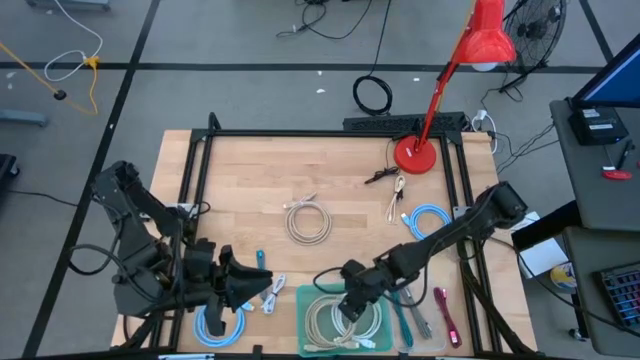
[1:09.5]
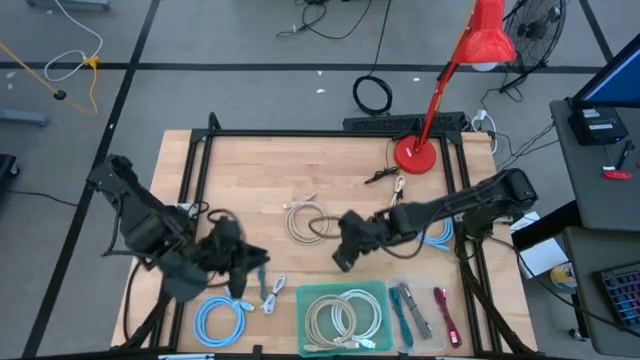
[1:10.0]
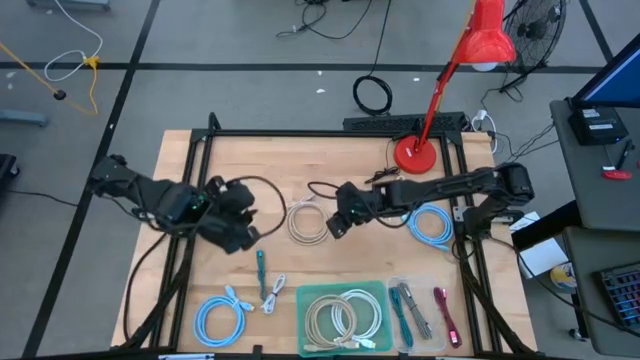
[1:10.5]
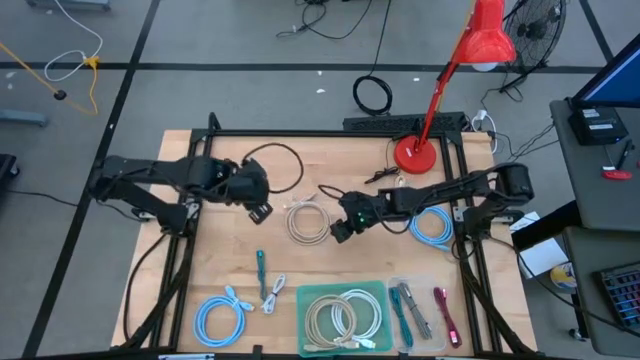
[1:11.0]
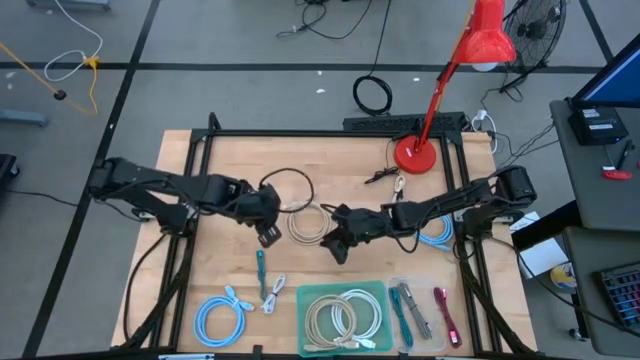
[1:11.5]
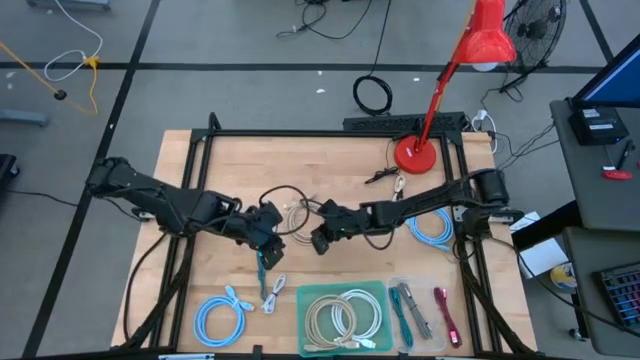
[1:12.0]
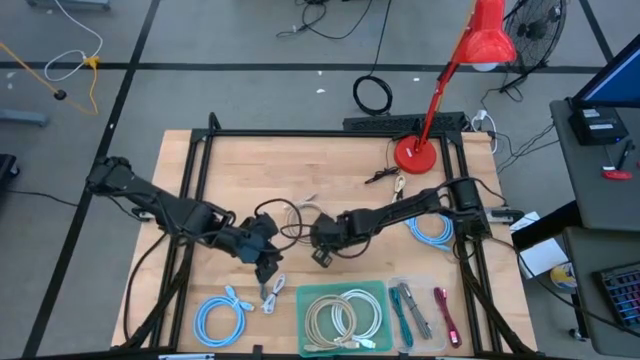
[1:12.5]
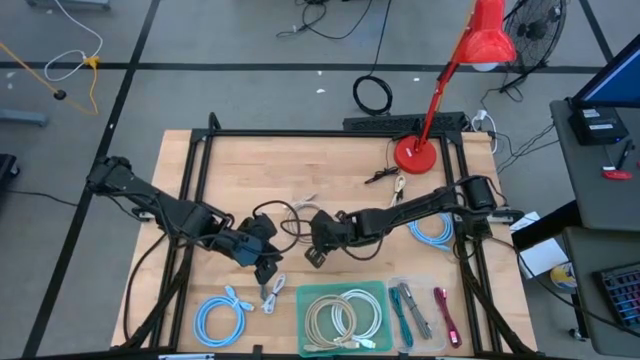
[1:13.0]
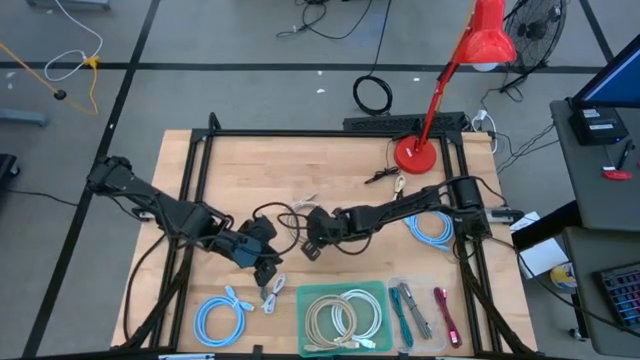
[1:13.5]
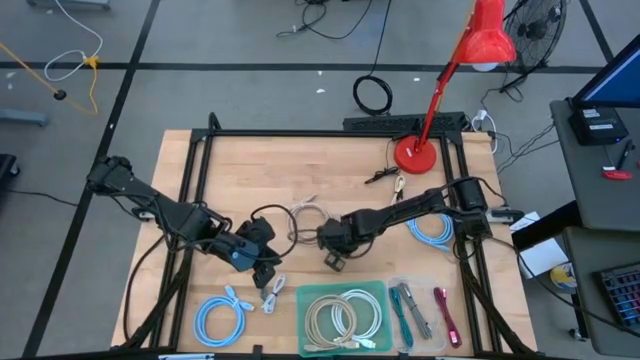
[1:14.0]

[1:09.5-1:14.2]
Task: Pick & Place USB Port
Put the brown hdmi cable into the green bin

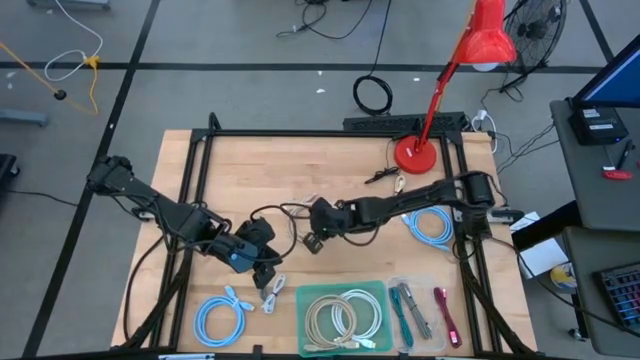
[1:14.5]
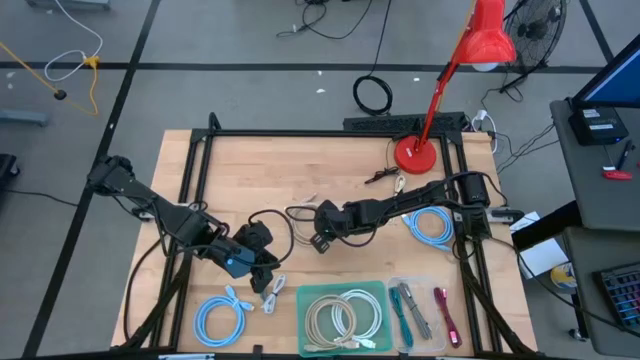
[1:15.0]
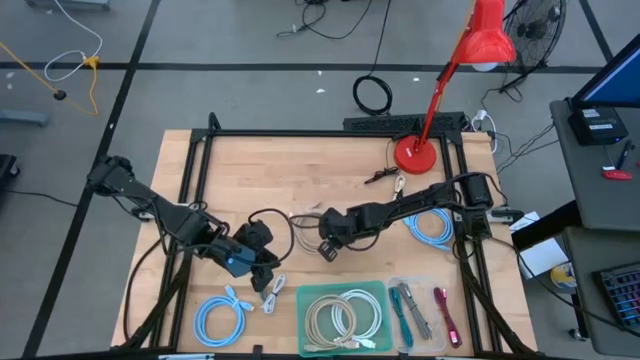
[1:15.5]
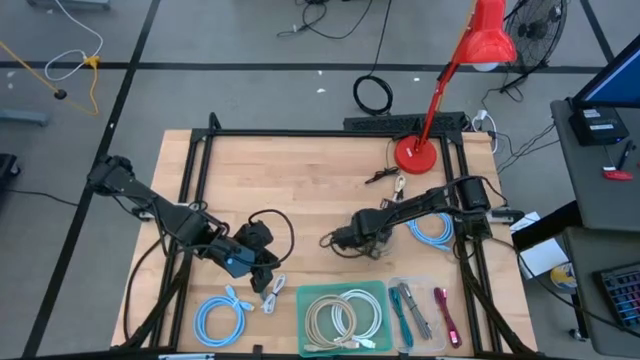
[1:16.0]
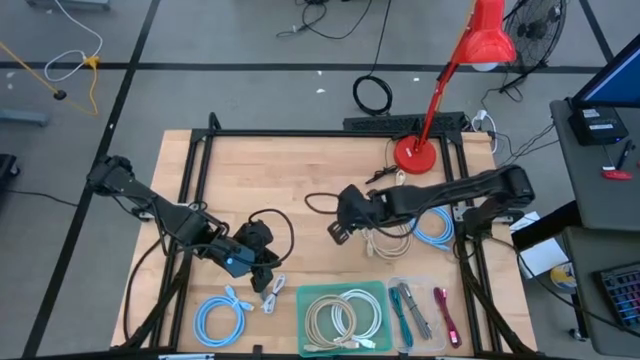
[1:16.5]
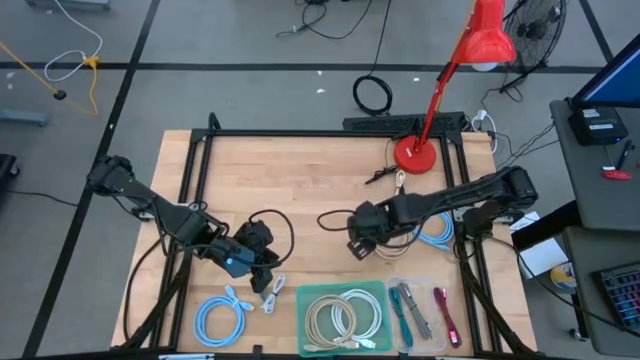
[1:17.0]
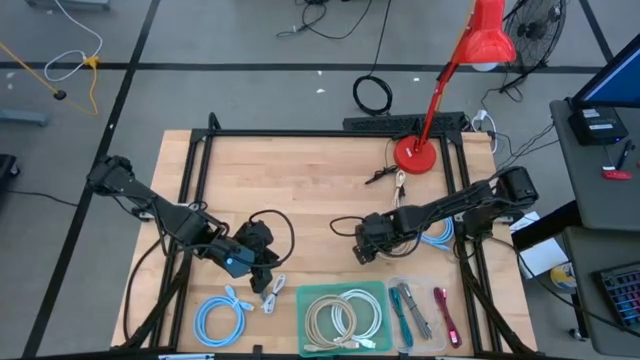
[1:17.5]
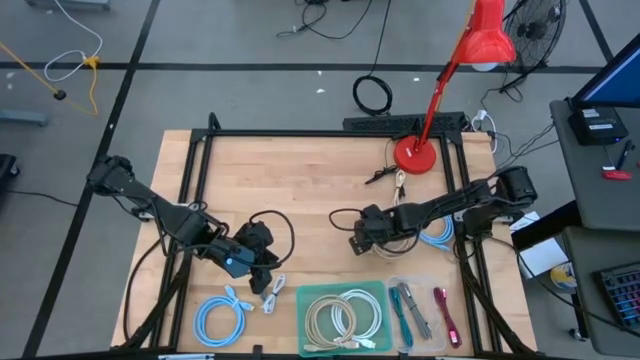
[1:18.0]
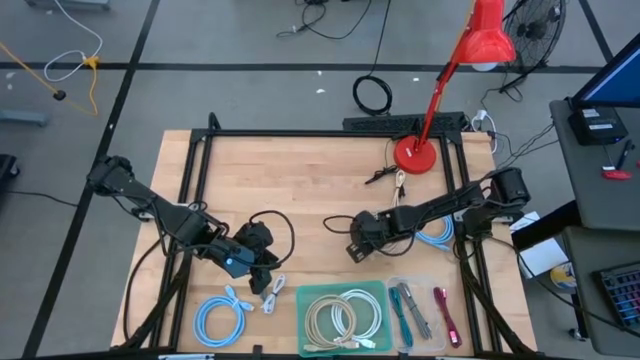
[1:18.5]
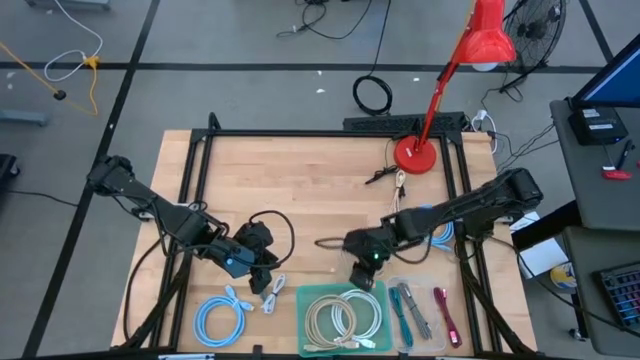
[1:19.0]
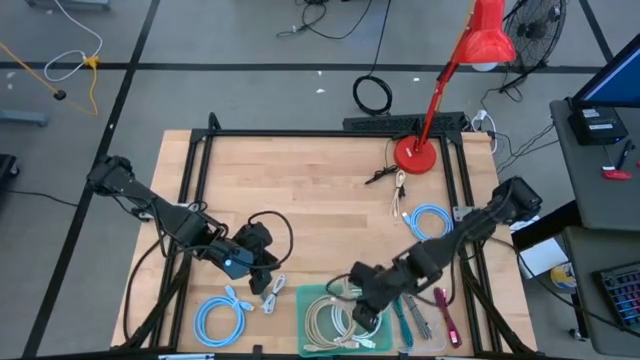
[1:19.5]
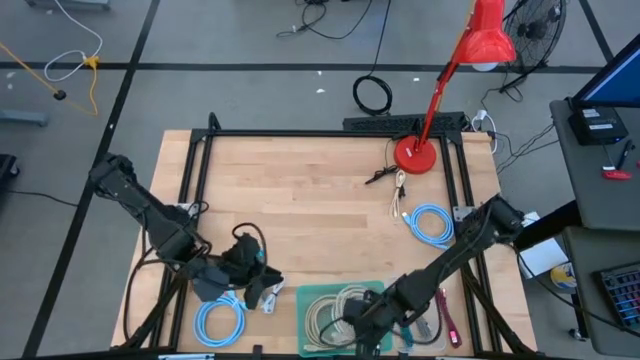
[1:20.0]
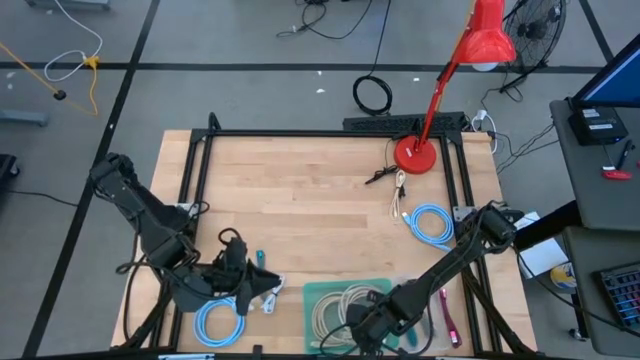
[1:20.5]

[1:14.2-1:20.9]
Put the brown hdmi cable into the green bin

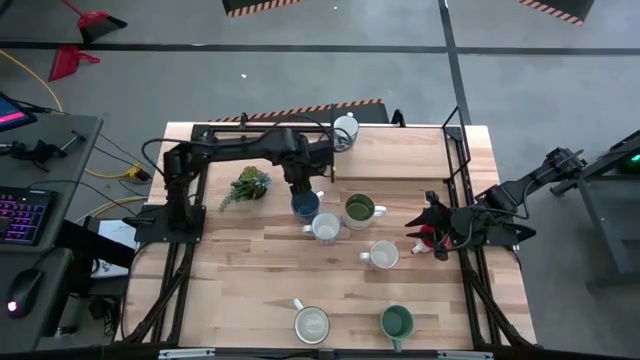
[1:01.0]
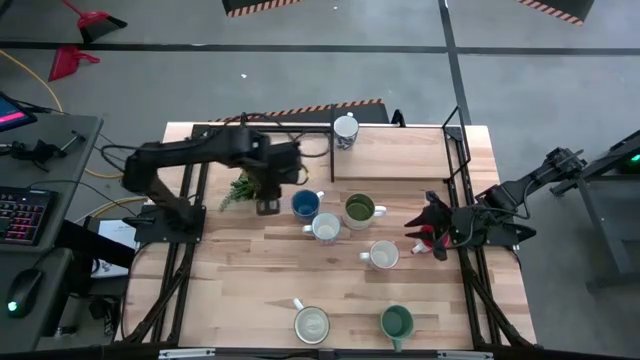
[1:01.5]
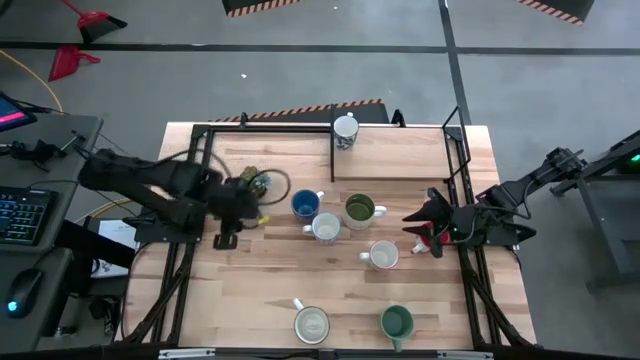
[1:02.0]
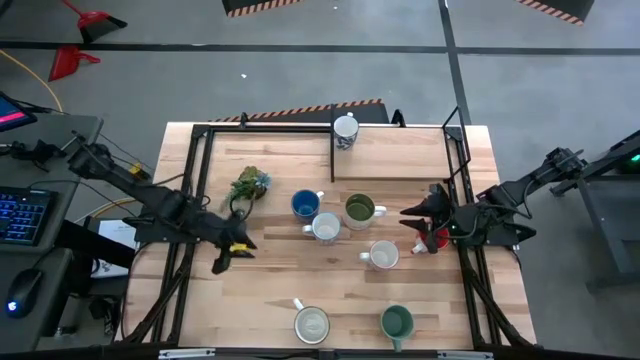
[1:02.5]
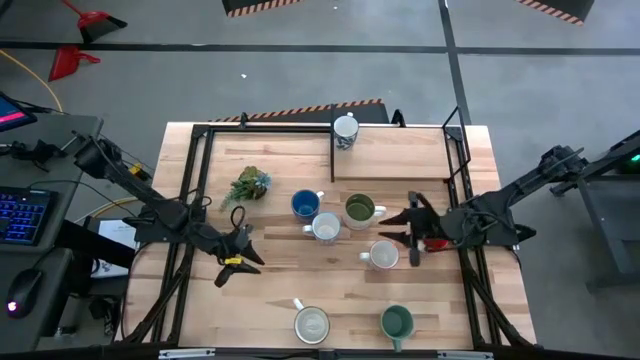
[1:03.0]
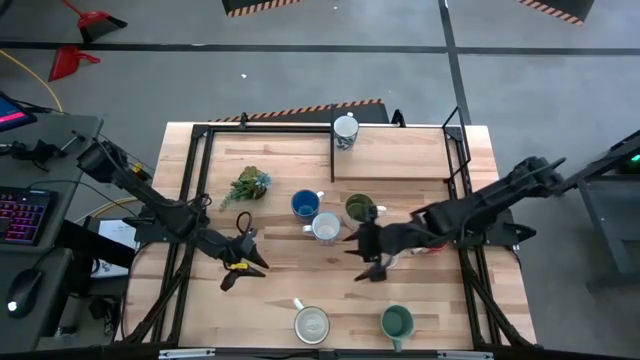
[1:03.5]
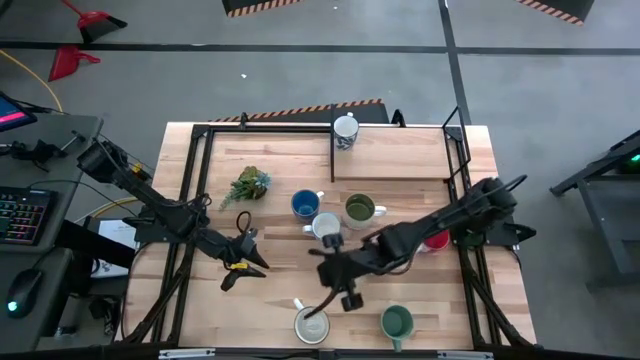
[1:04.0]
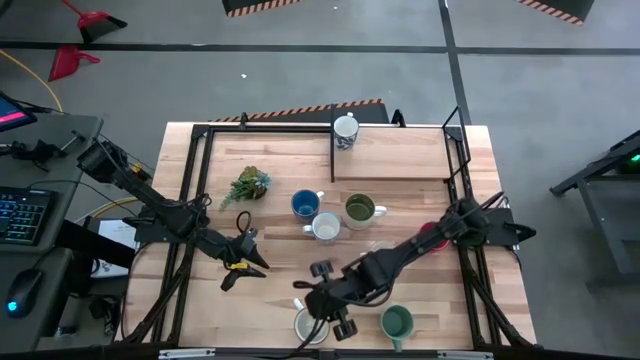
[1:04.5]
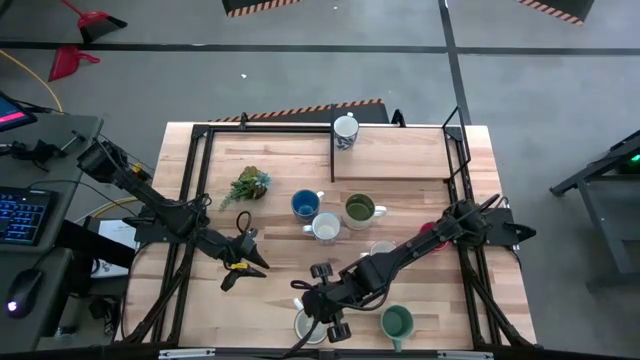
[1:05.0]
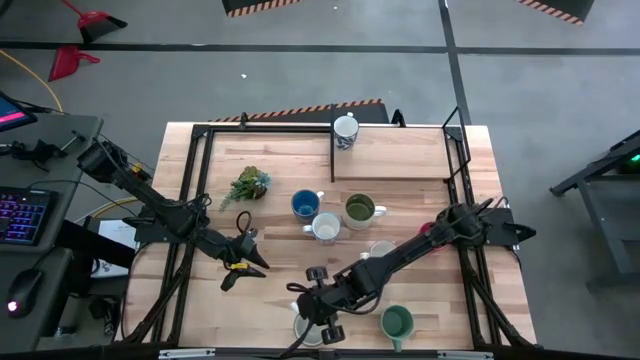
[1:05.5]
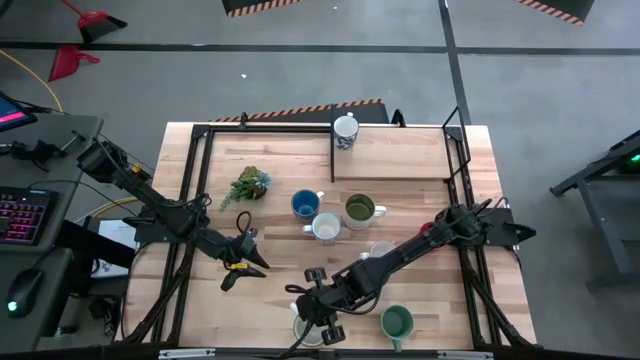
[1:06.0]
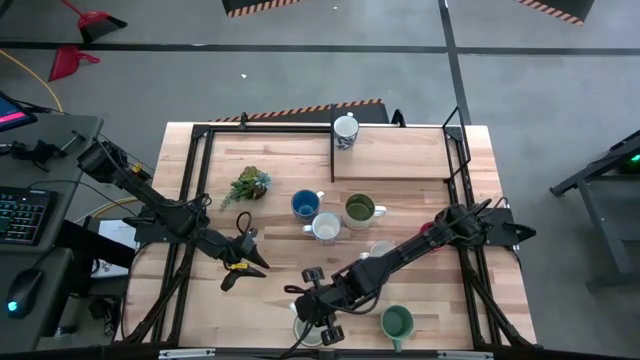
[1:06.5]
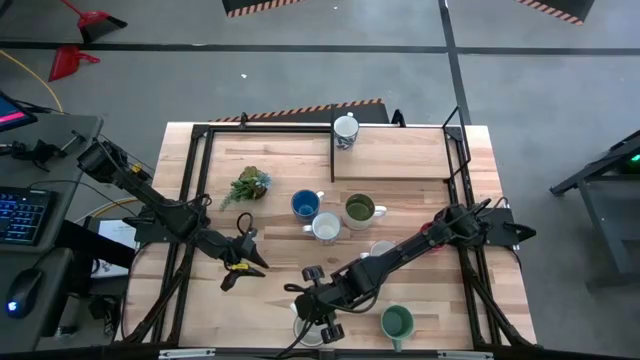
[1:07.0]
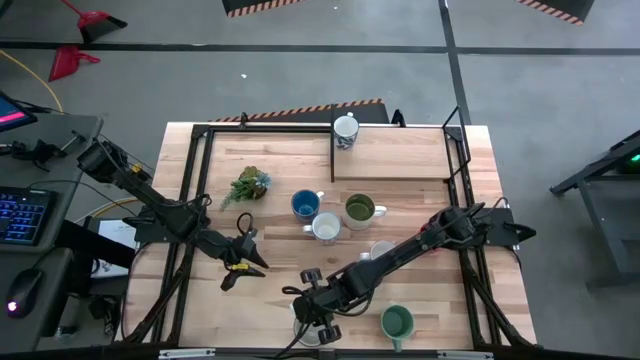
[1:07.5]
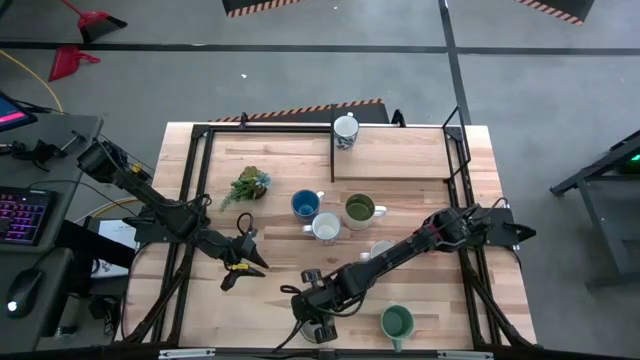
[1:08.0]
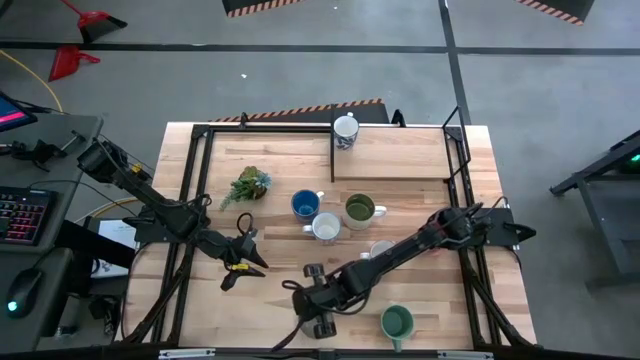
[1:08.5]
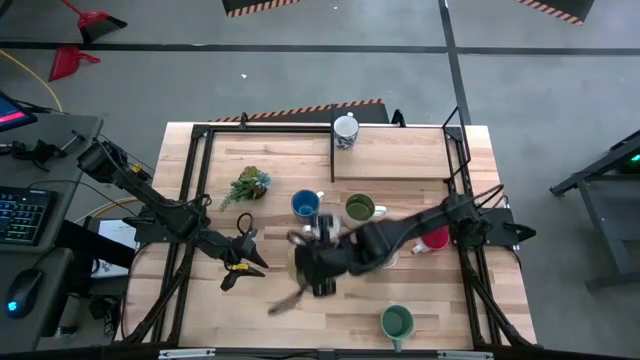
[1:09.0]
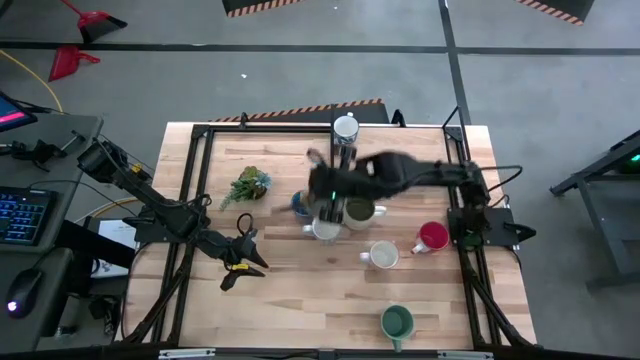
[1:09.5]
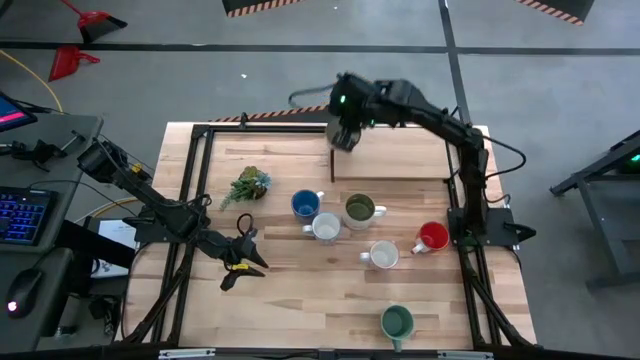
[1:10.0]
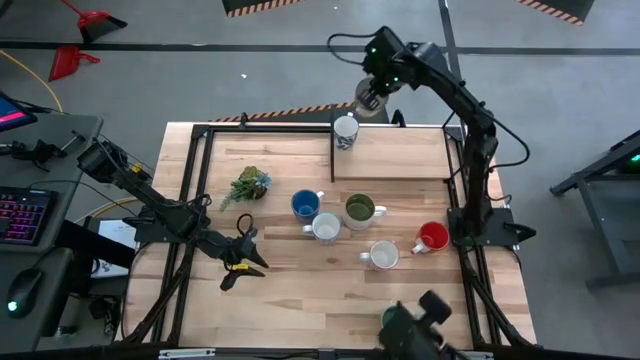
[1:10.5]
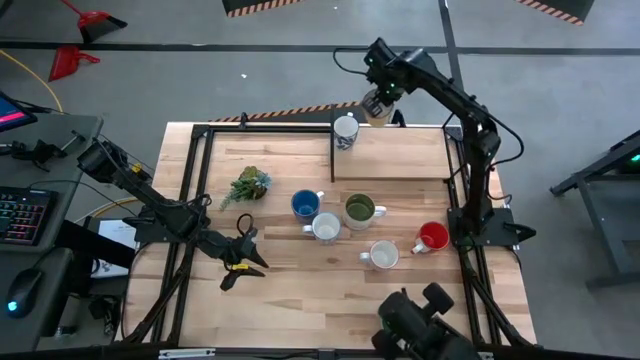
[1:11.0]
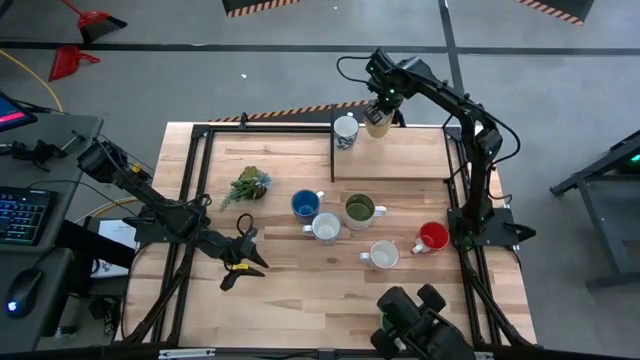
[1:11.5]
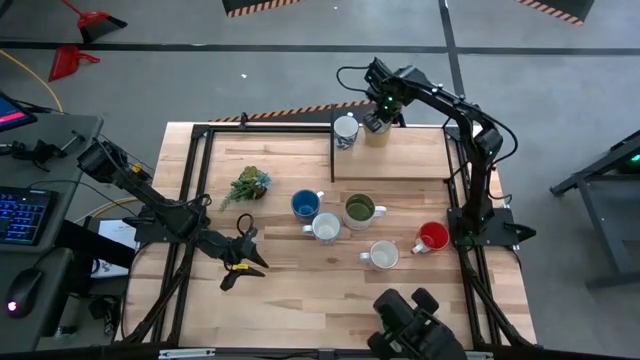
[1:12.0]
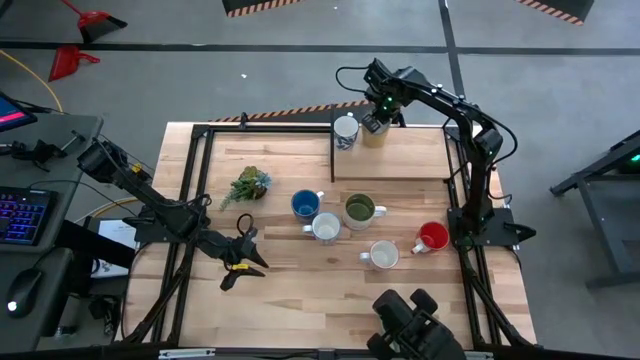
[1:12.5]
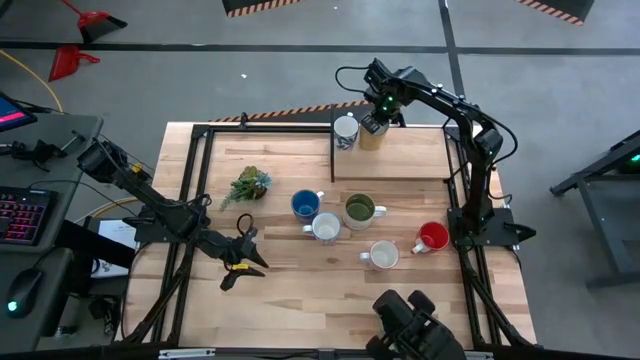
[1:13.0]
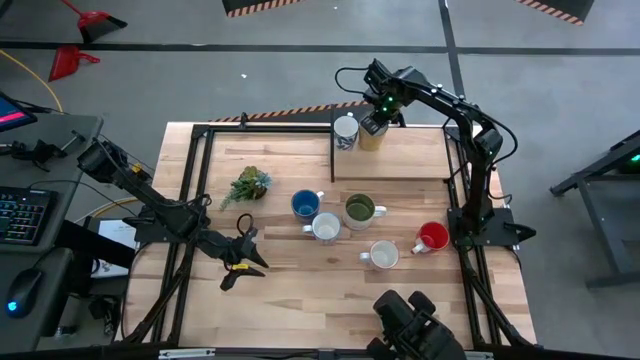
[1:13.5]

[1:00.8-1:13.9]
Task: Place coffee mugs
Put the yellow mug on the shelf
